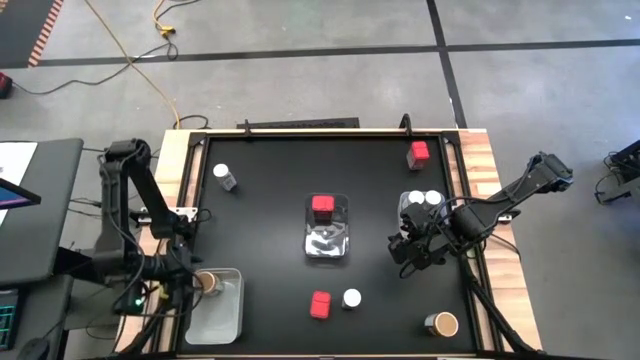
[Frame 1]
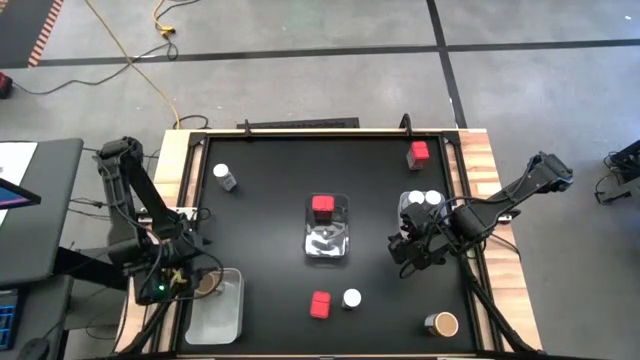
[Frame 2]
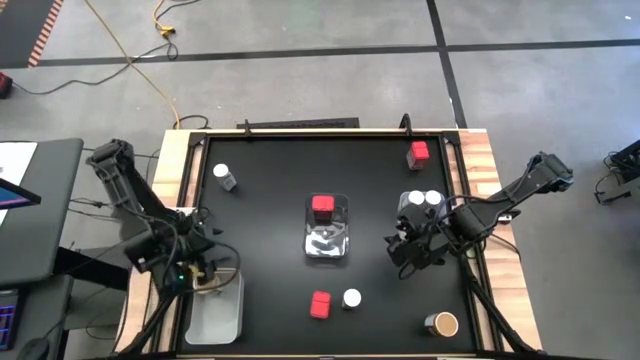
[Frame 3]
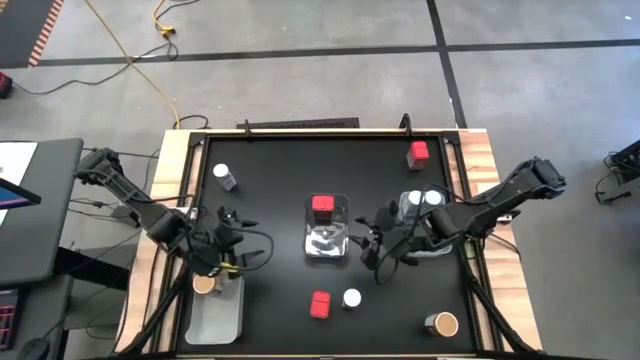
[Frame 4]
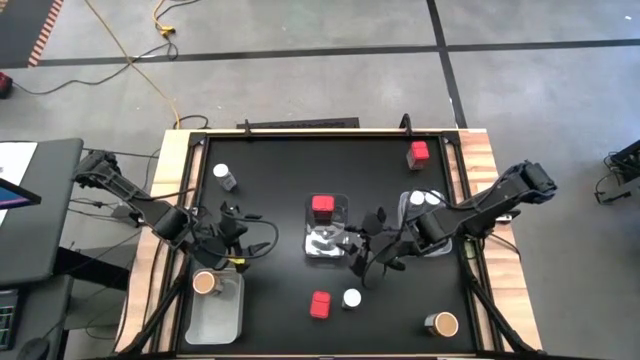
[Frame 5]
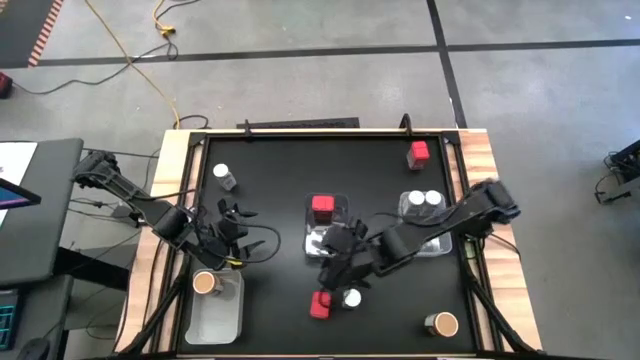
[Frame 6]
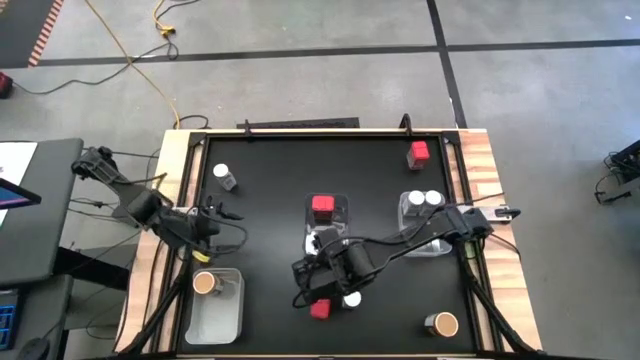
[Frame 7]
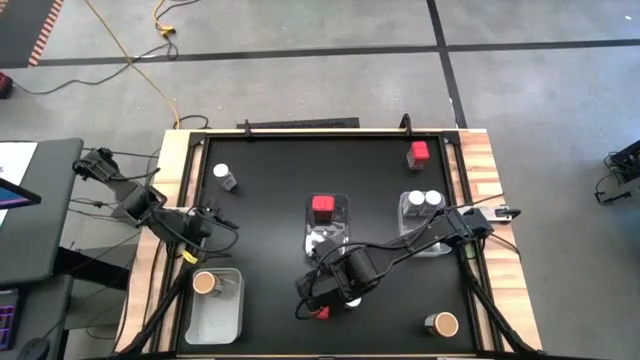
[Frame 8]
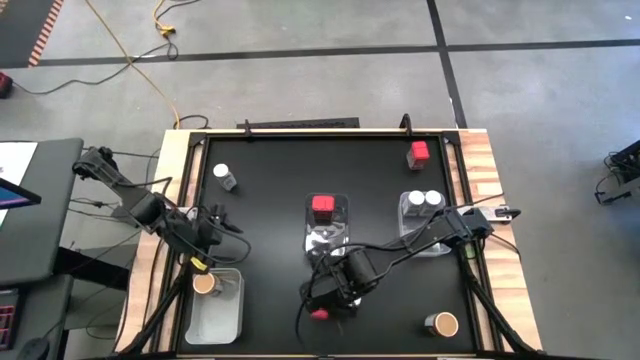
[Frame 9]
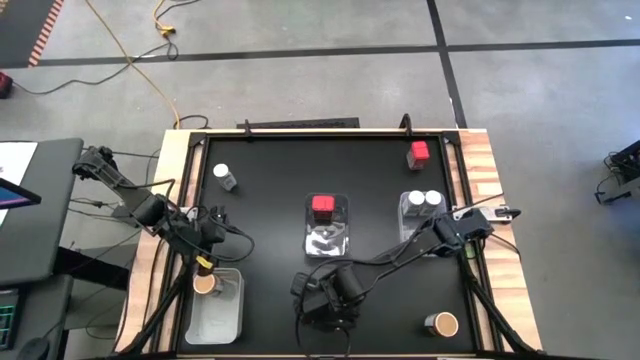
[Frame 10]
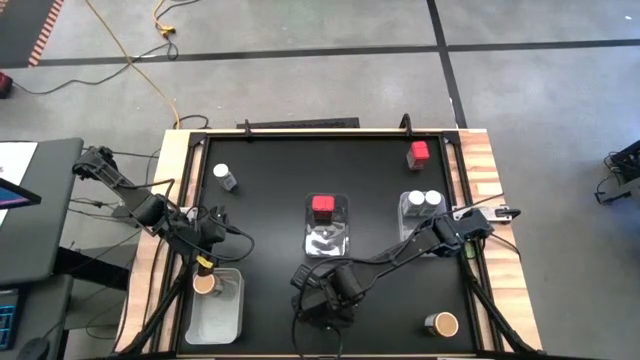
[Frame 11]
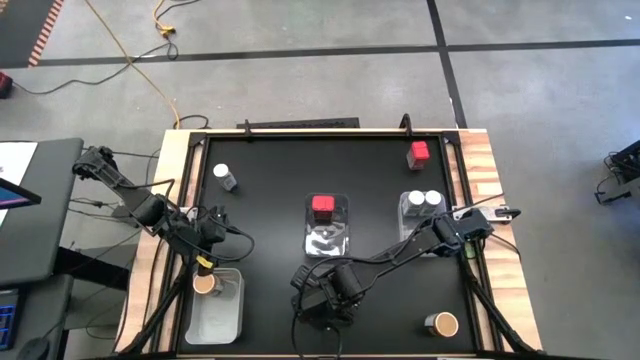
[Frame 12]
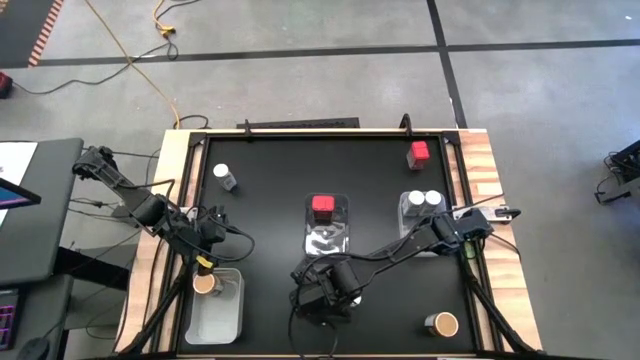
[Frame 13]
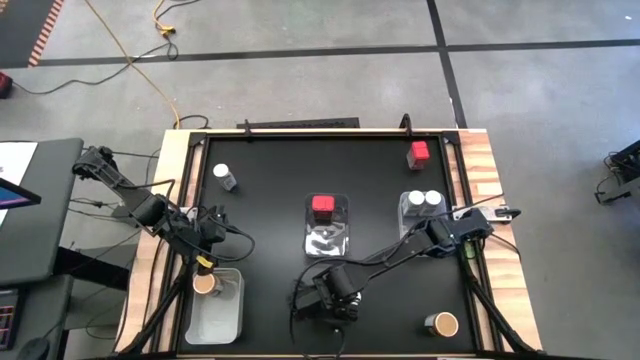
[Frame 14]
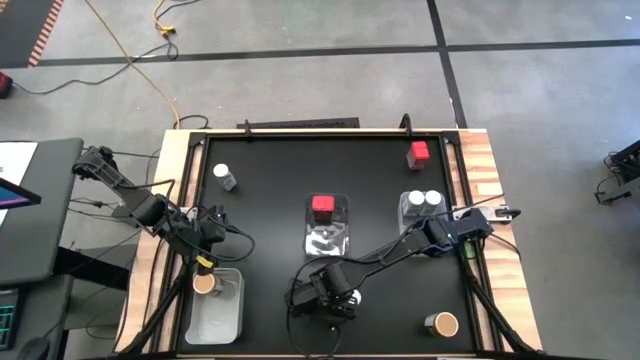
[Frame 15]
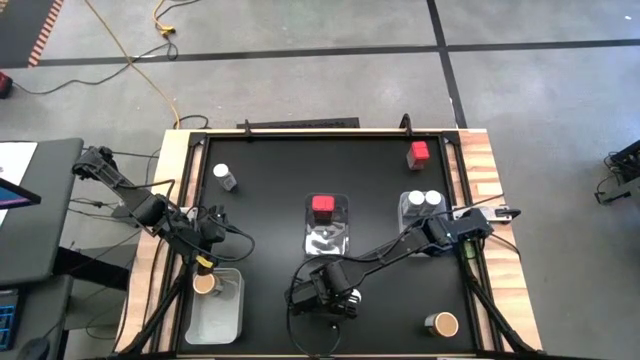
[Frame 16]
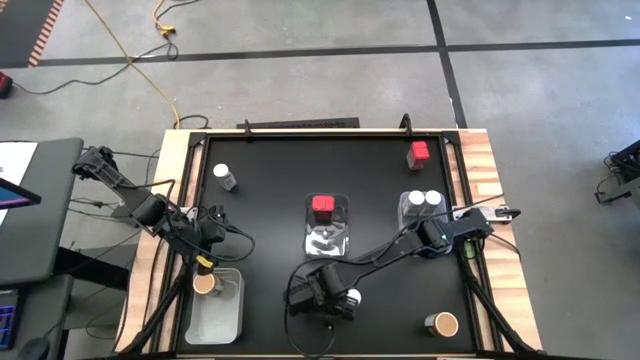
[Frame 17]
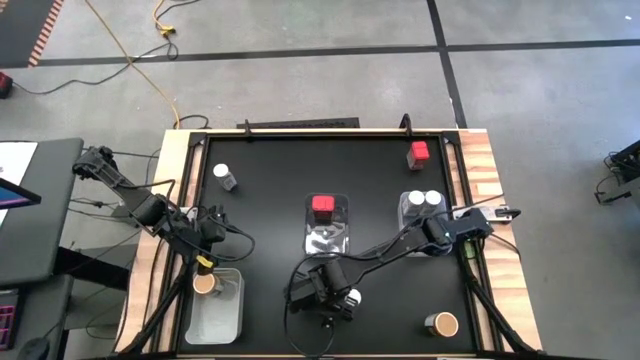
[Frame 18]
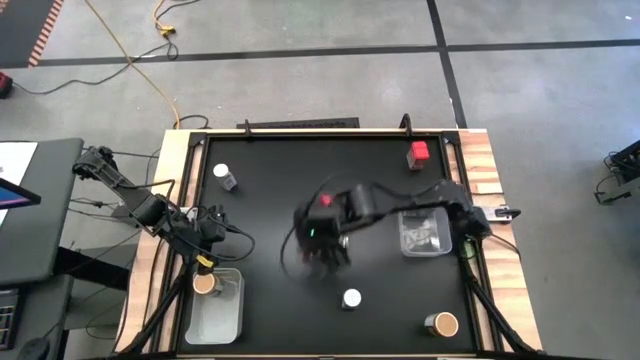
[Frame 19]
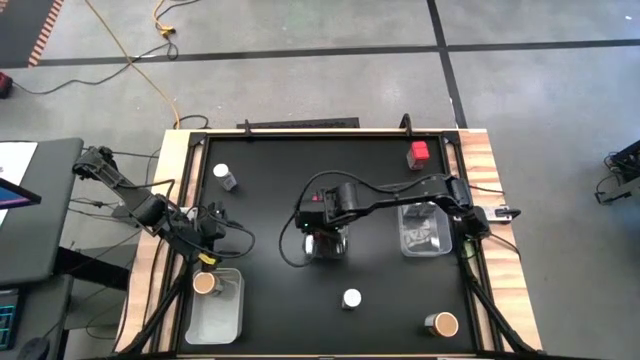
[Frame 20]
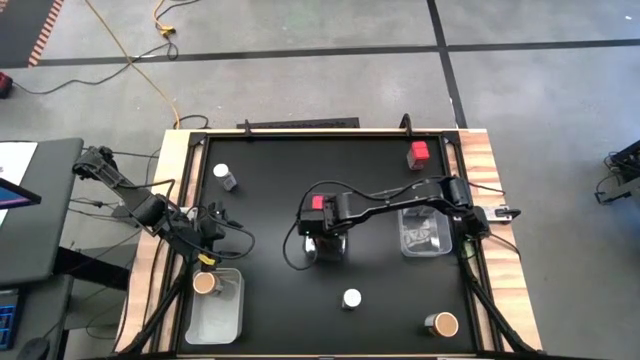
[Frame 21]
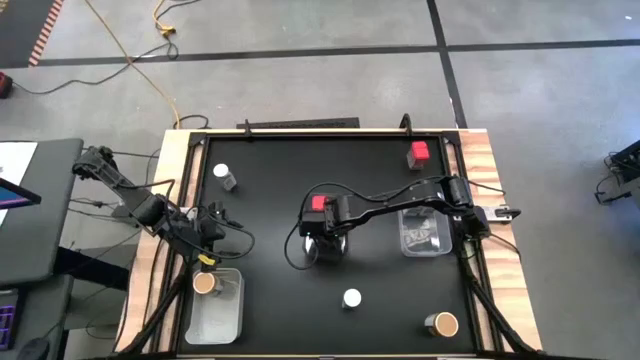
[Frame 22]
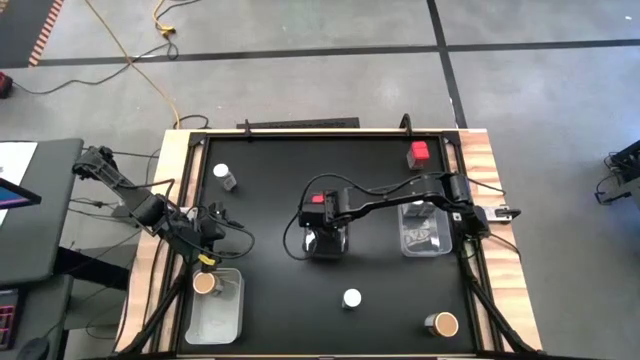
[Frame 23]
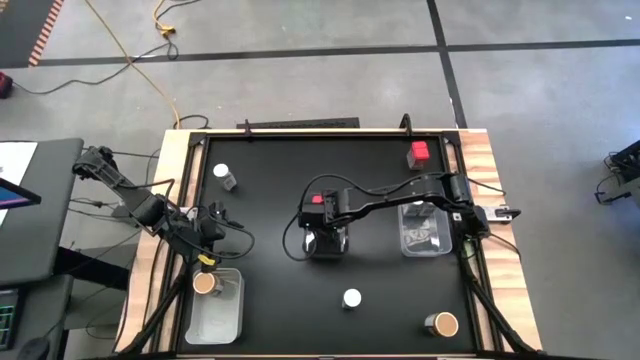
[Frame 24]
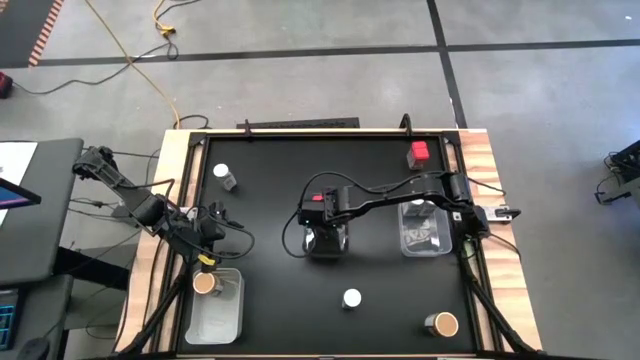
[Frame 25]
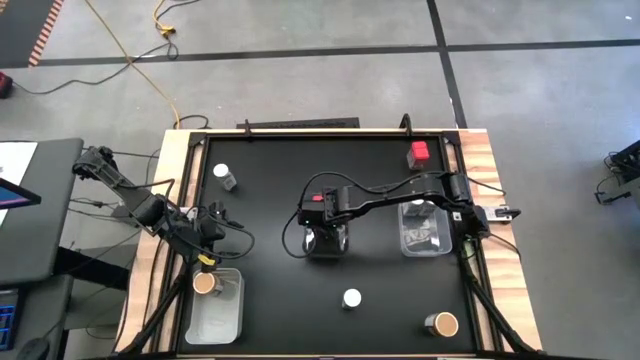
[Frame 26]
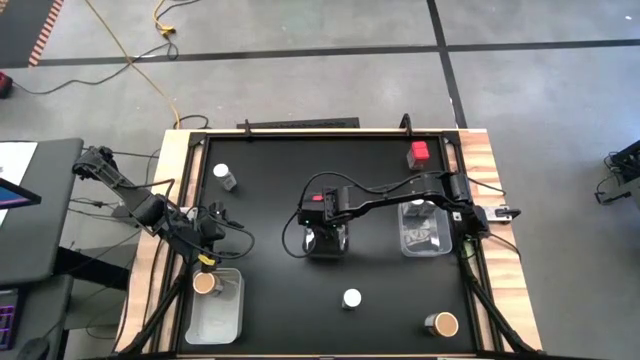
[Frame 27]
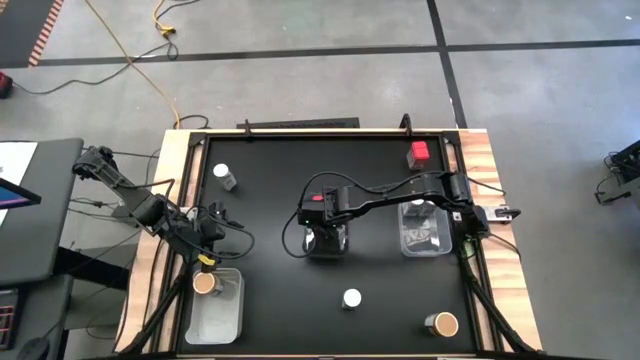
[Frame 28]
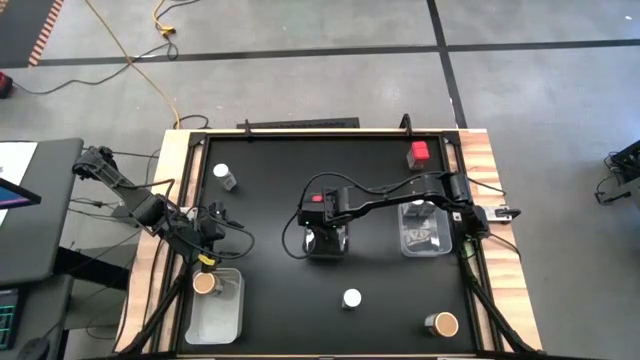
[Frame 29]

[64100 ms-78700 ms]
Task: Sort spices by type
Put the red seasoning can into the black bin

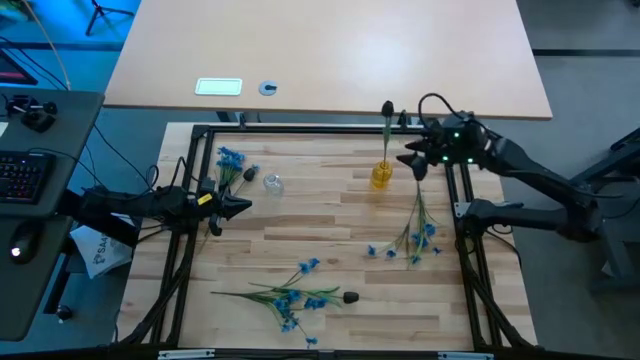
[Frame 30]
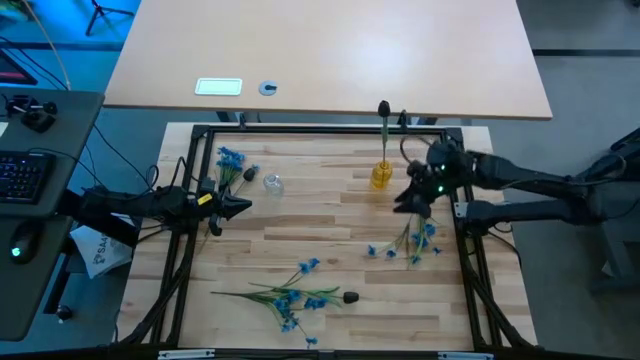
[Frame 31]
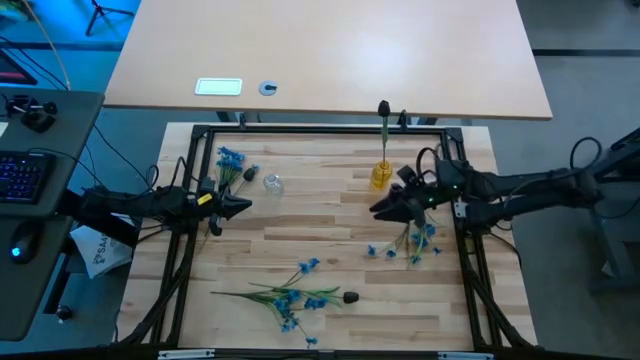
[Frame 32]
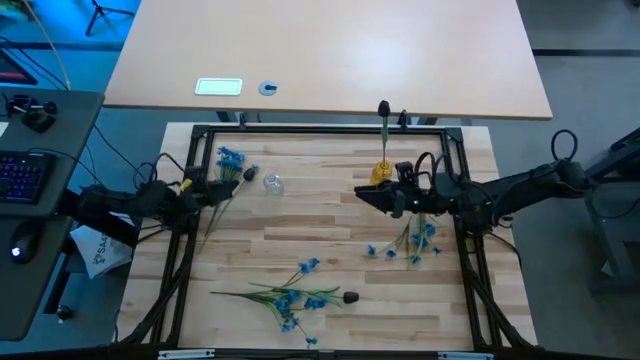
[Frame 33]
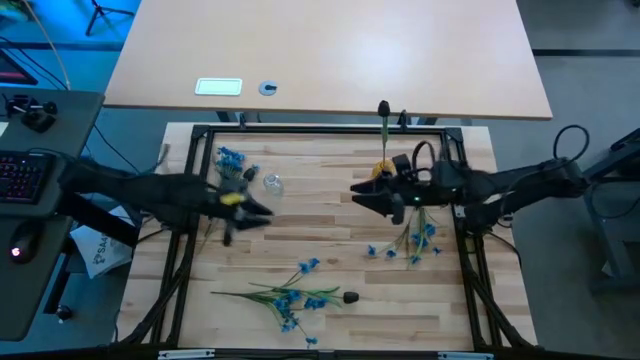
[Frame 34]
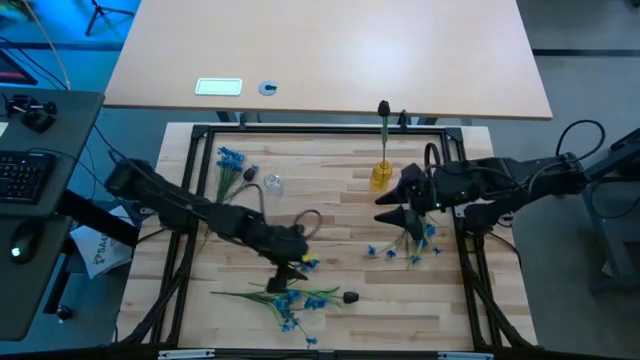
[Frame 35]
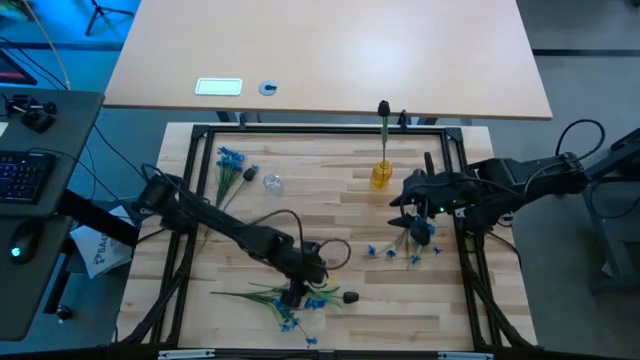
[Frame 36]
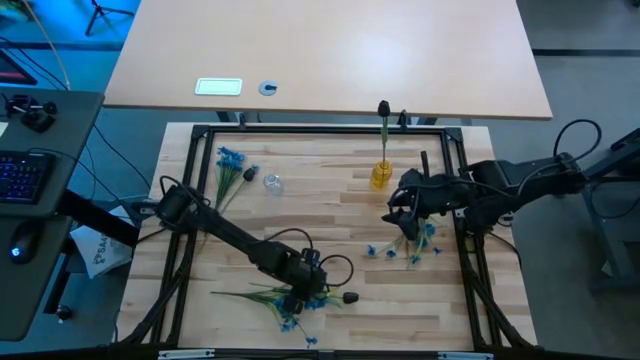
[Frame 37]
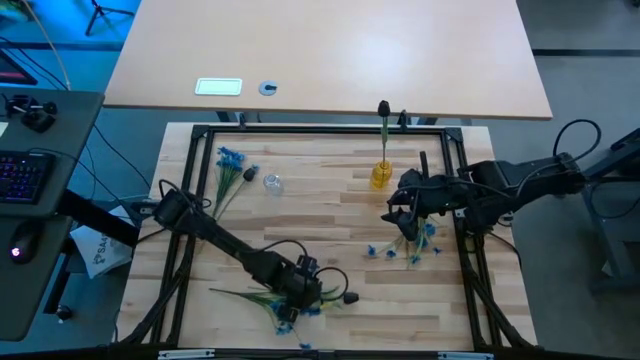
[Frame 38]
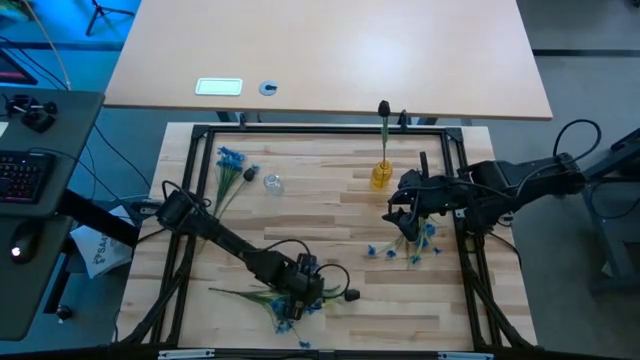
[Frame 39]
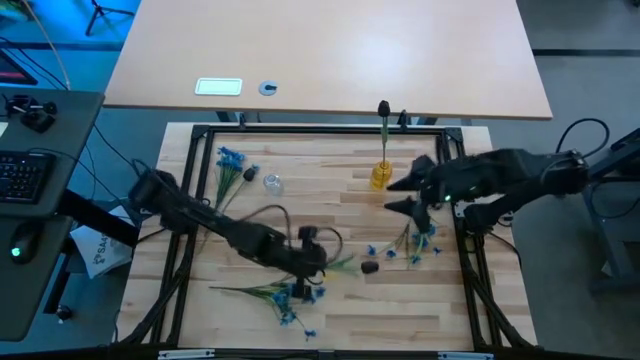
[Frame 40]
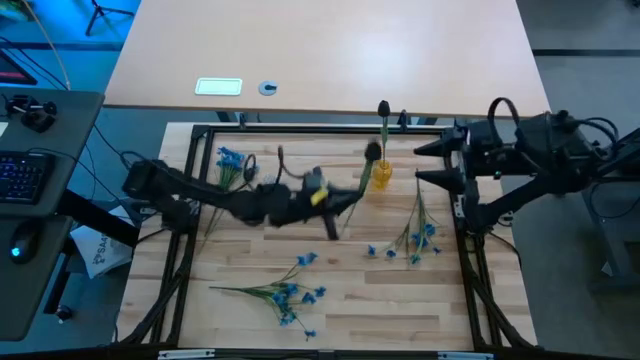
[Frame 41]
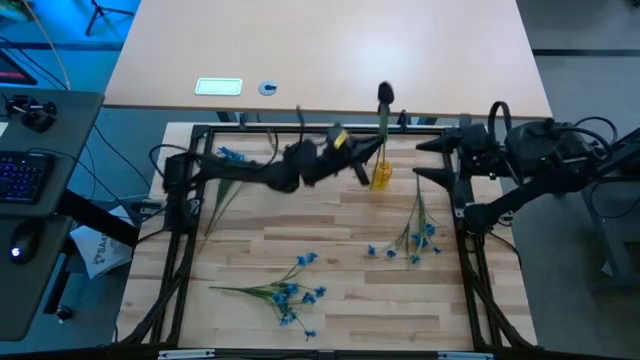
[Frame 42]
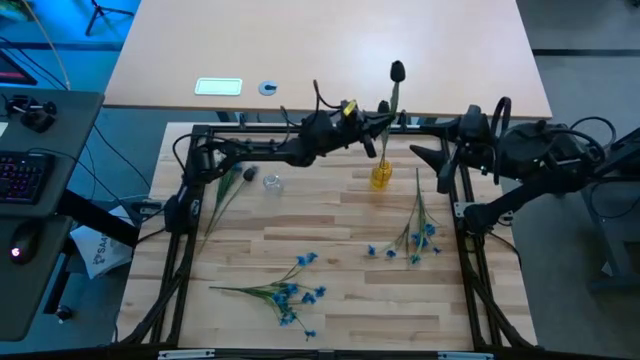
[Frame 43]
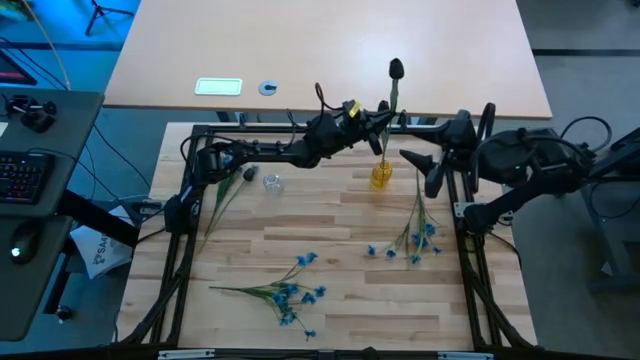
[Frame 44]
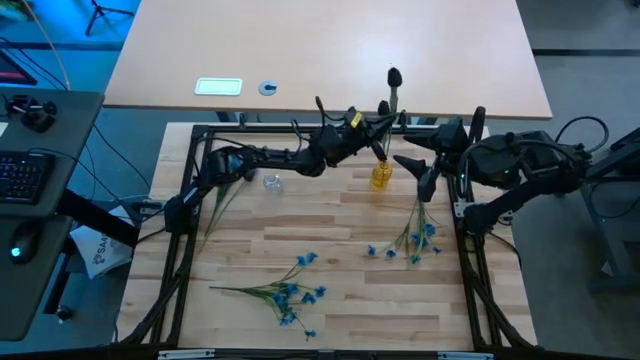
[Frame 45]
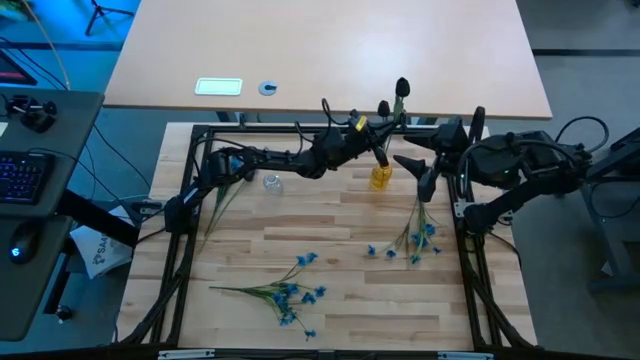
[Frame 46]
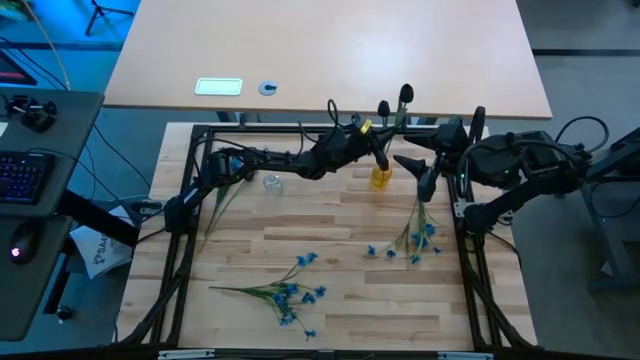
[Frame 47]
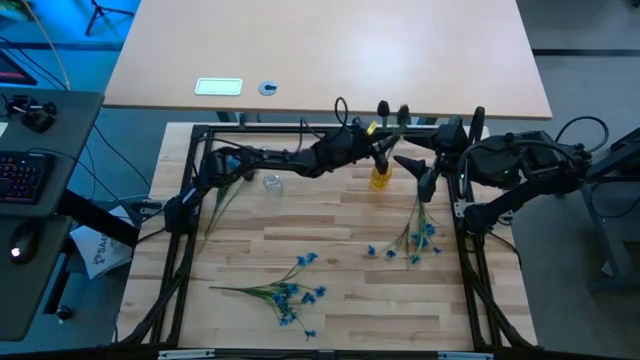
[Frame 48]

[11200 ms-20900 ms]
Task: Sort flowers into vase by color
Put the bottom black tulip flower into the yellow crystal vase
